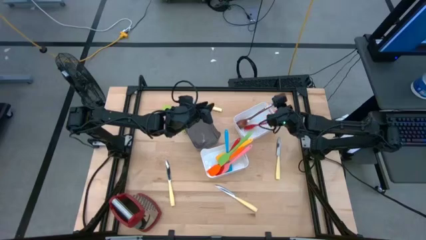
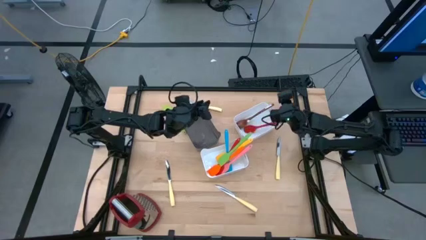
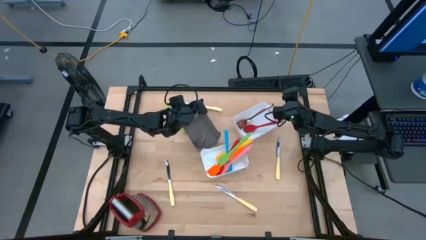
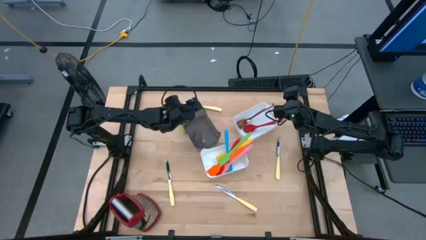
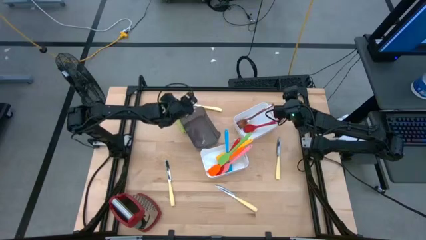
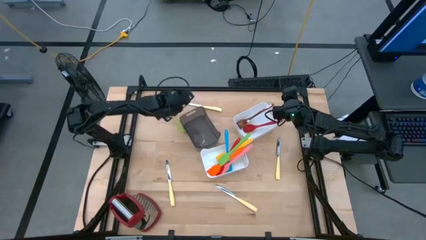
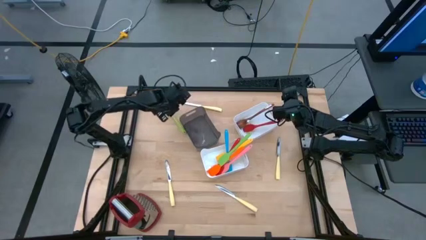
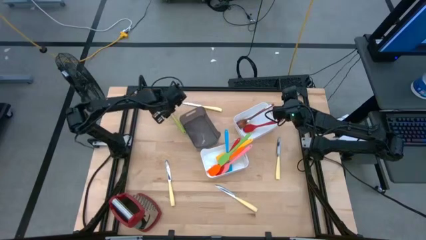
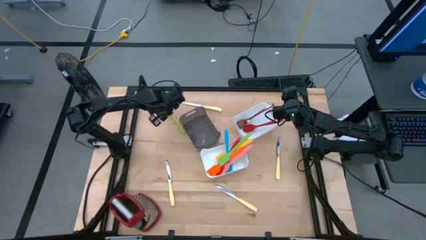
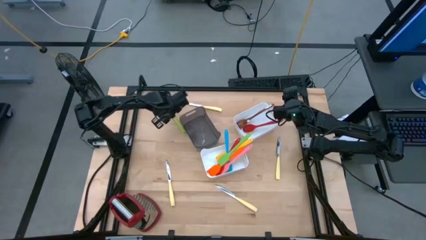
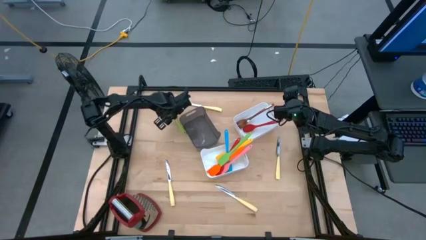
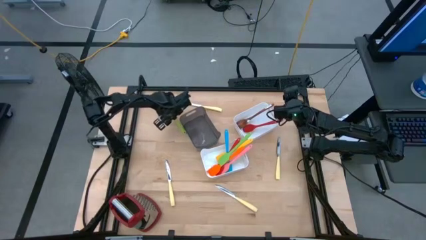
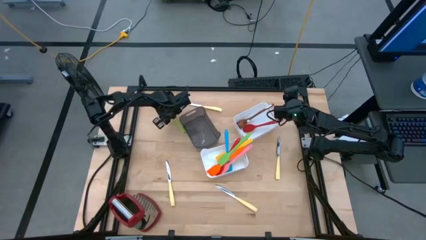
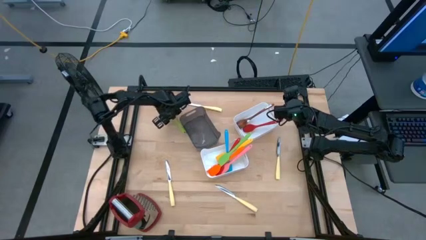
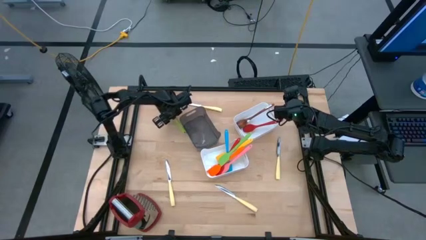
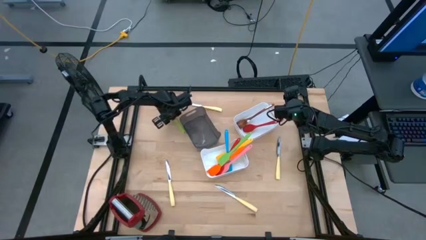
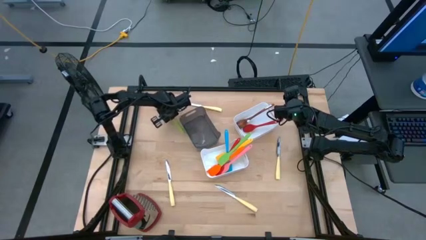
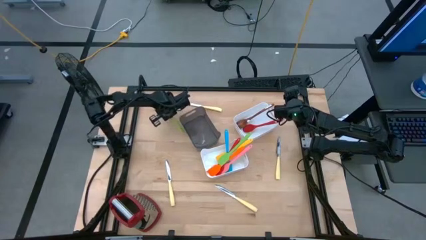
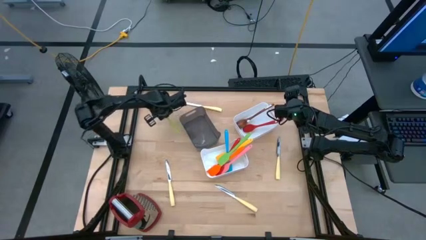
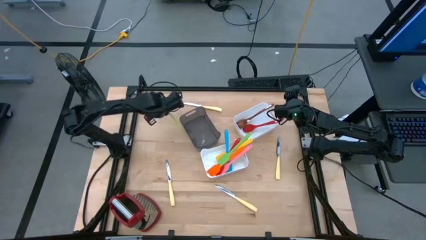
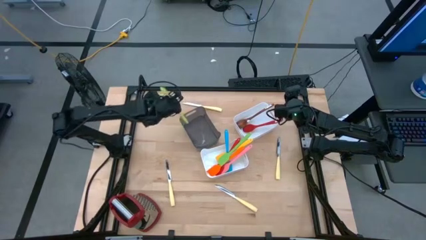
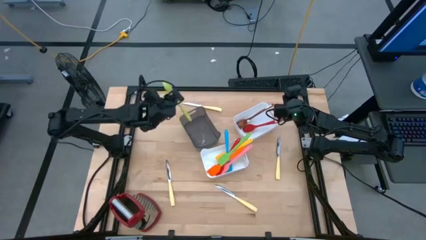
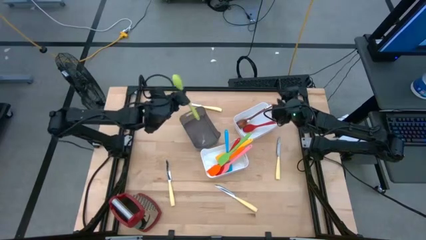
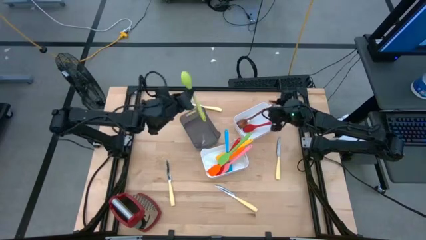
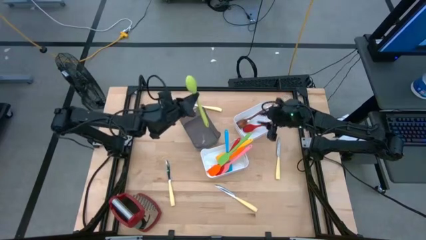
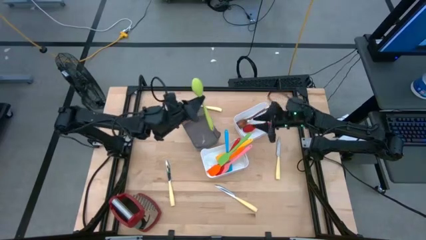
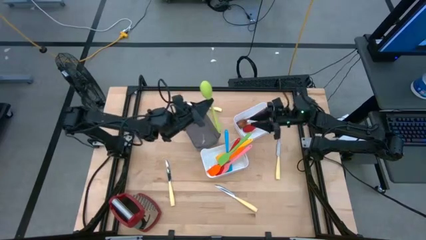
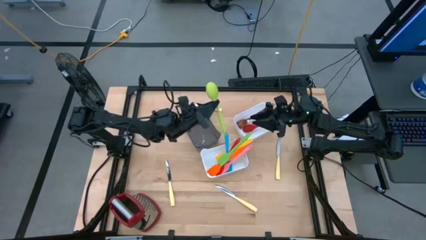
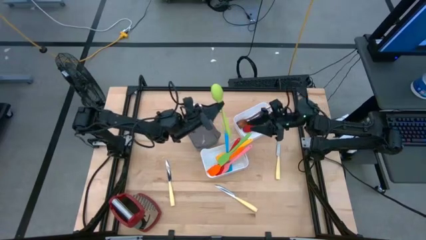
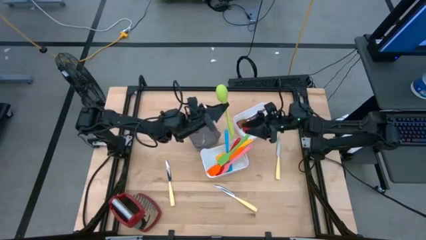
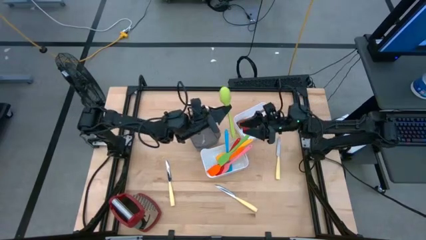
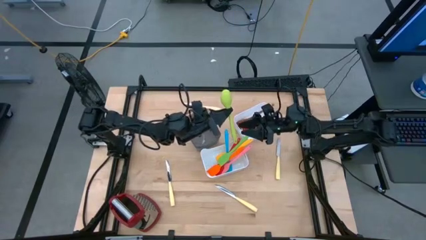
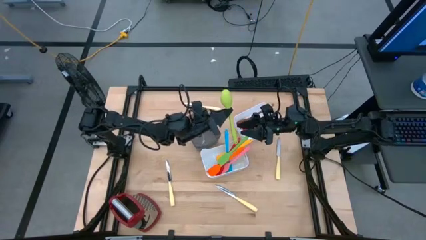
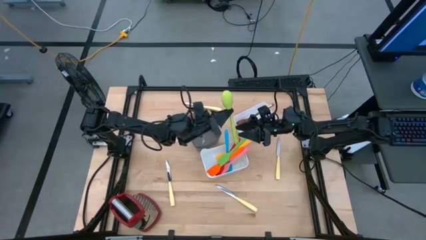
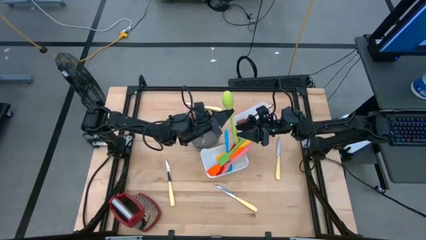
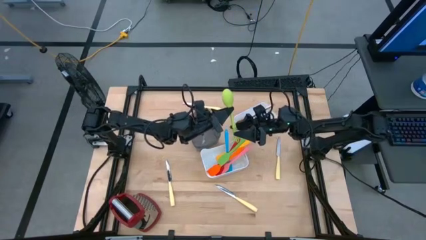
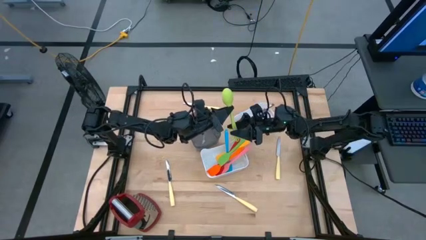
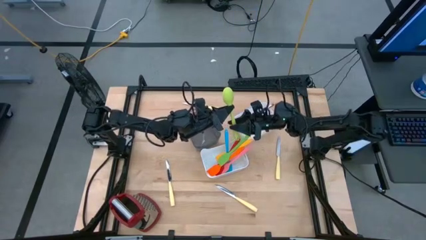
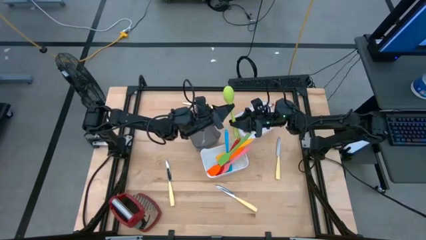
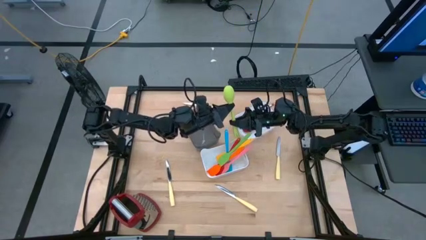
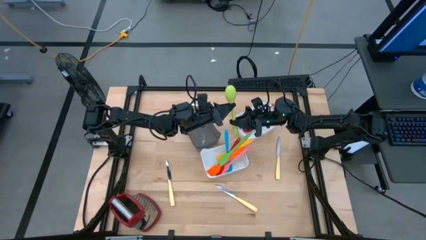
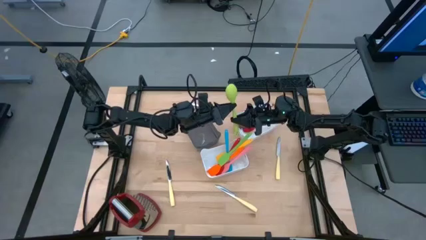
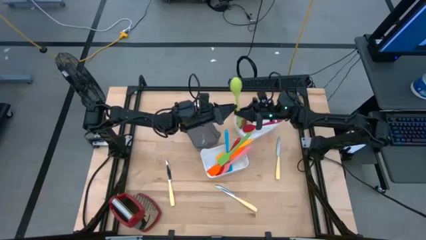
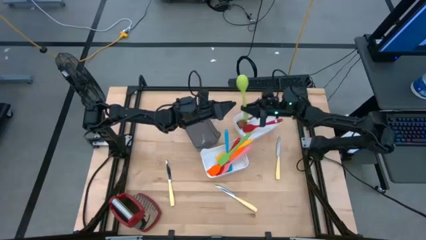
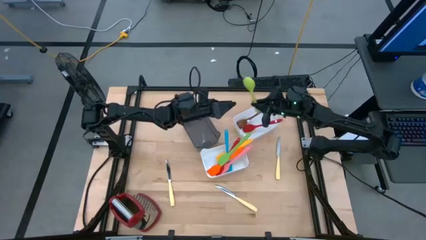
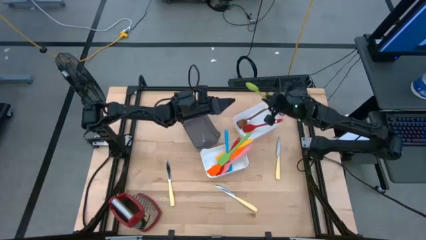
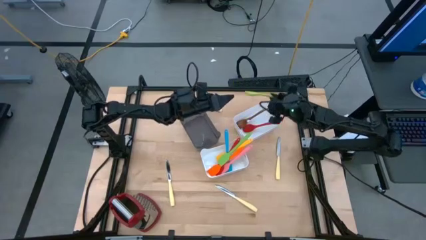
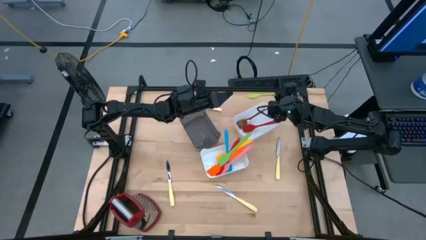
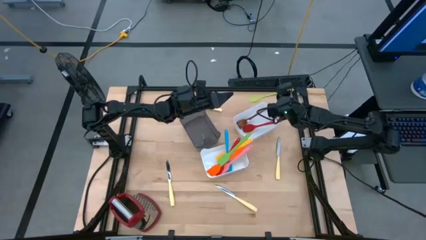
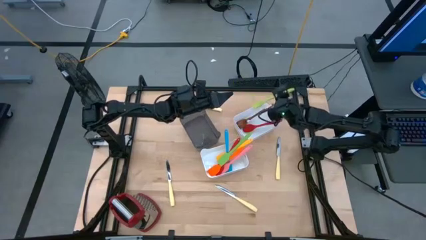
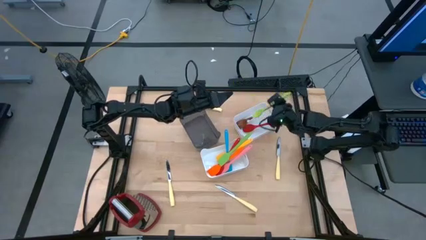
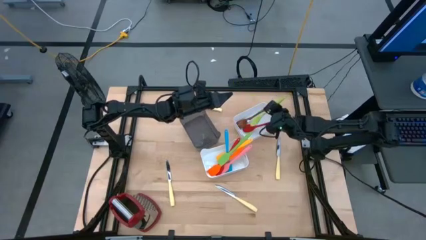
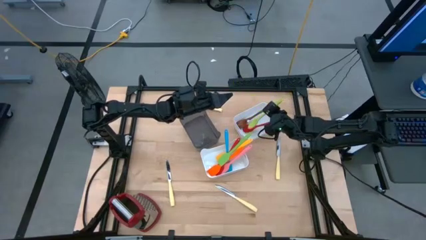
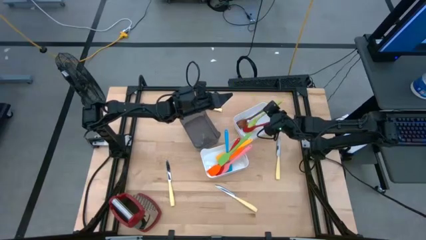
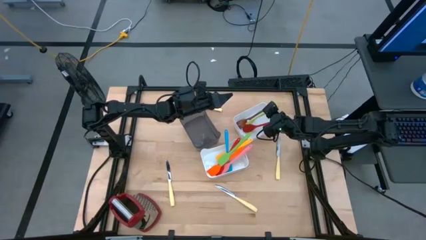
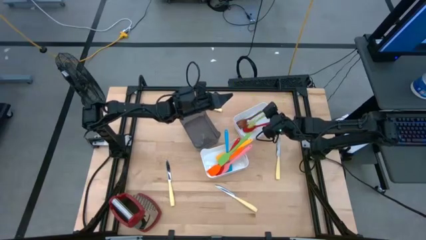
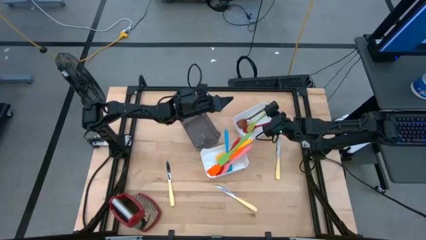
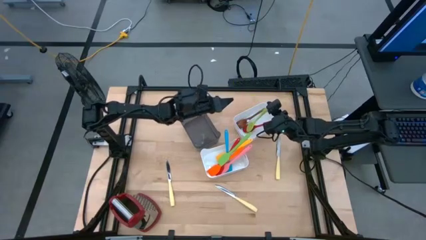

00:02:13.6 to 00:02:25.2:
Task: Pick & Place Kitchen Items
Put the green spoon into the top white bin

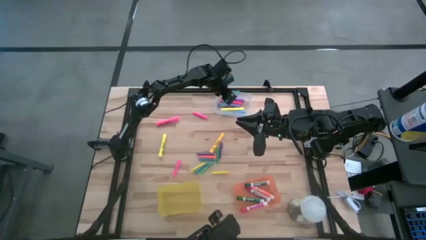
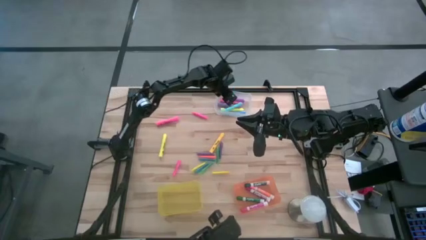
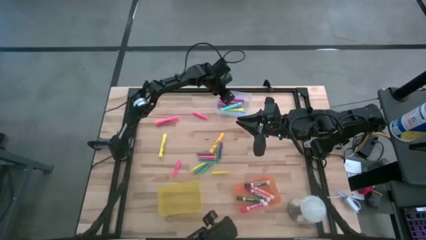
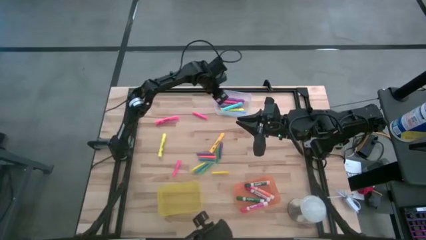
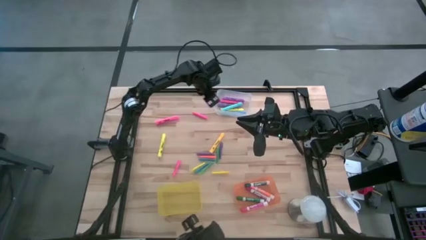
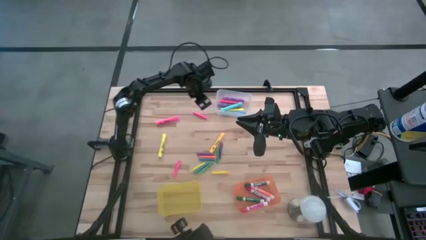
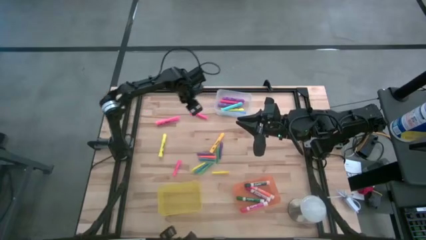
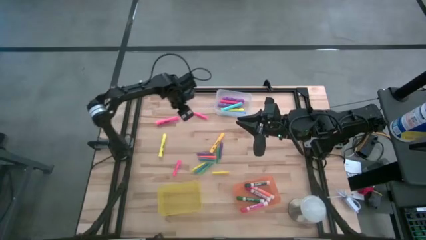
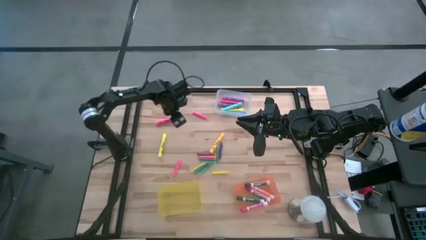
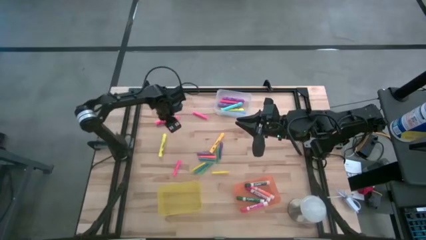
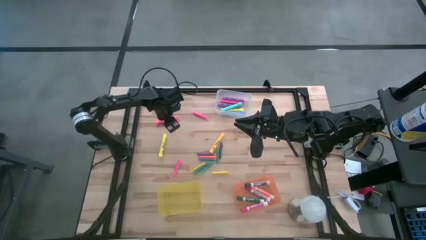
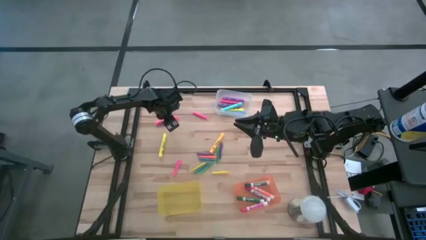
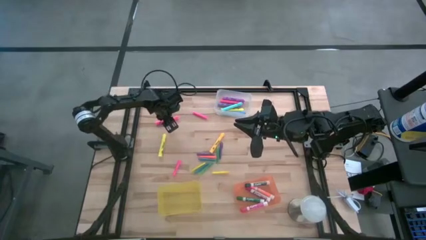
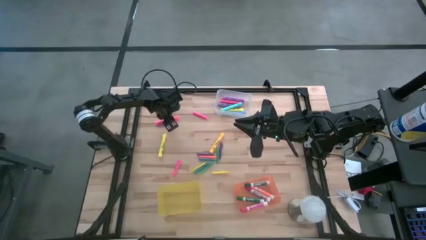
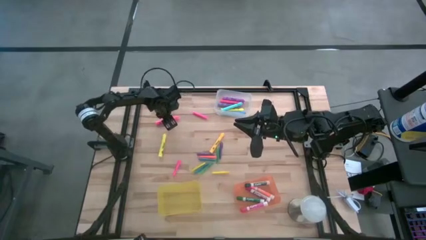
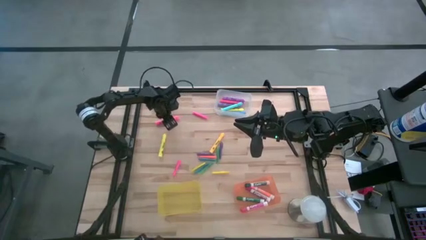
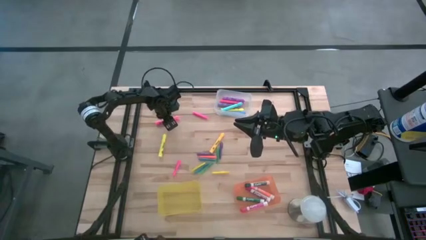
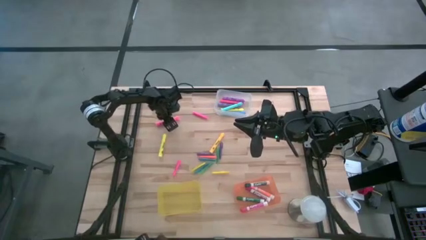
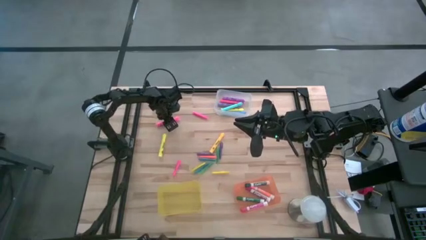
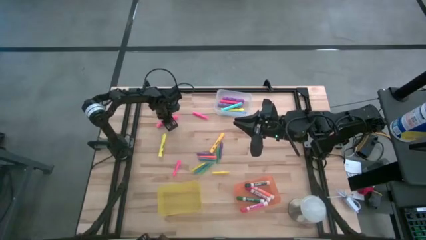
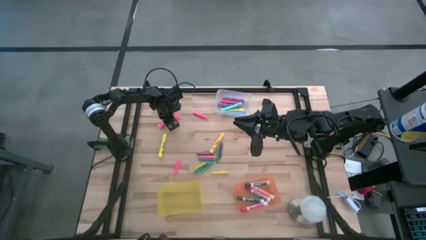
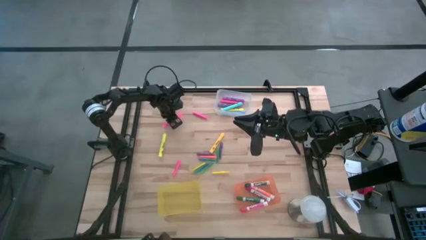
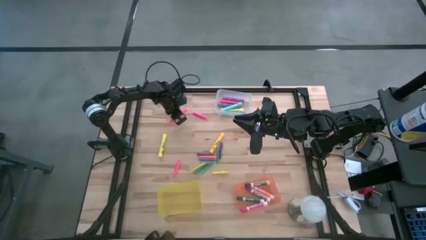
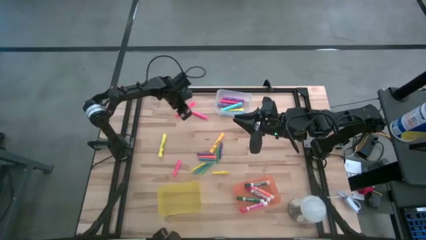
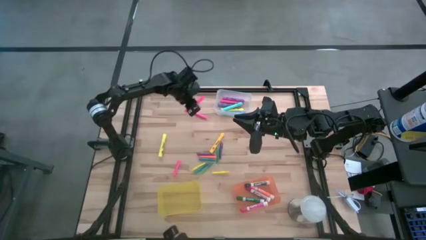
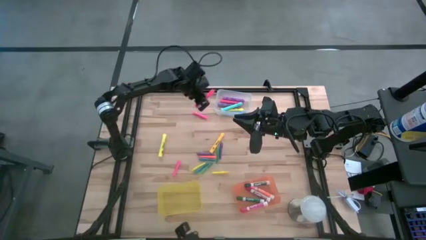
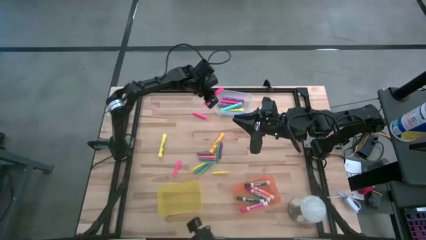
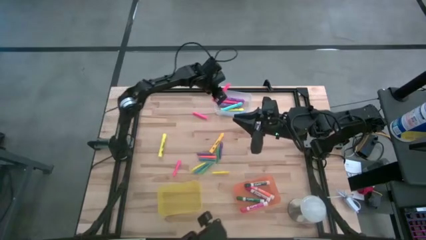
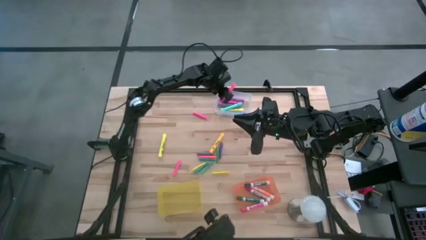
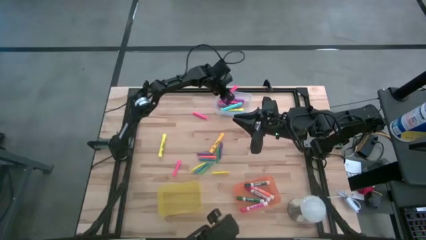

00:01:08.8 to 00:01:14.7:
Task: Pick & Place Markers
Put the pink highlighter pen into the transparent bin
